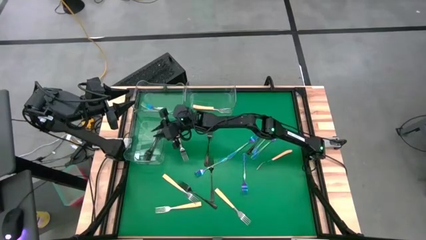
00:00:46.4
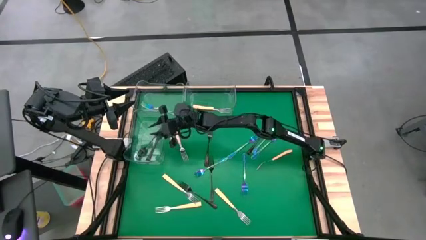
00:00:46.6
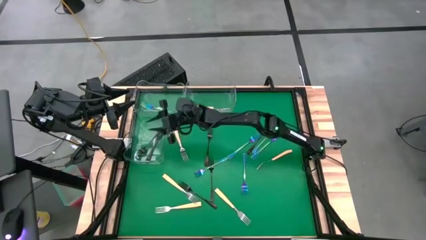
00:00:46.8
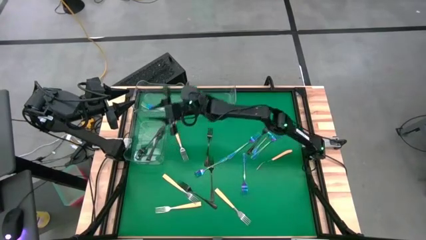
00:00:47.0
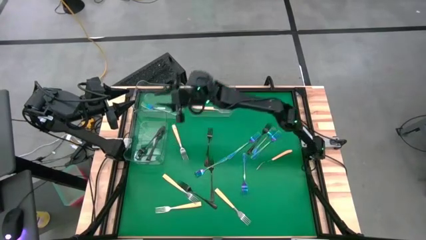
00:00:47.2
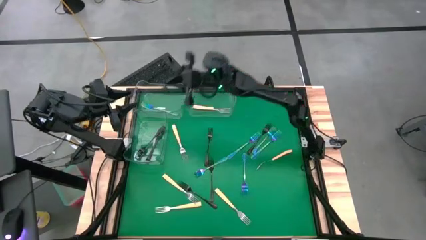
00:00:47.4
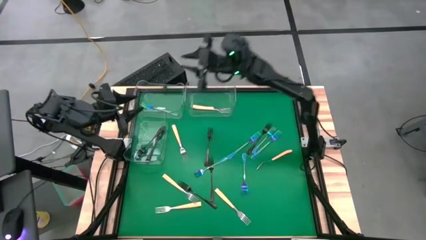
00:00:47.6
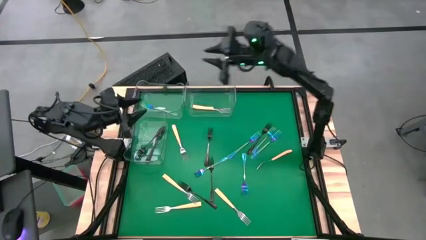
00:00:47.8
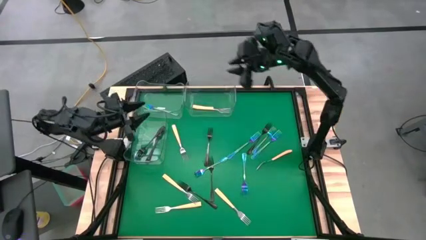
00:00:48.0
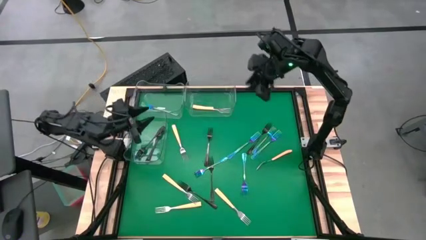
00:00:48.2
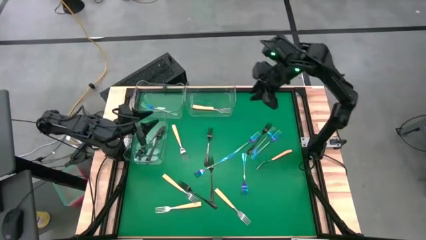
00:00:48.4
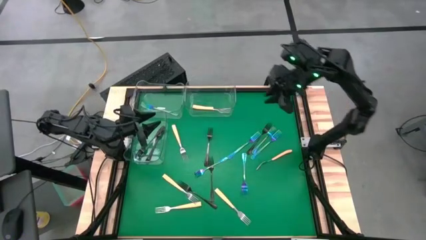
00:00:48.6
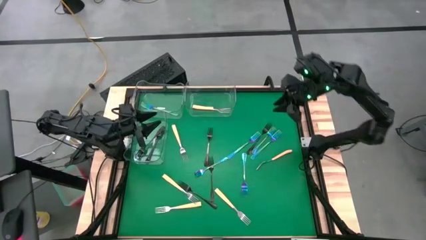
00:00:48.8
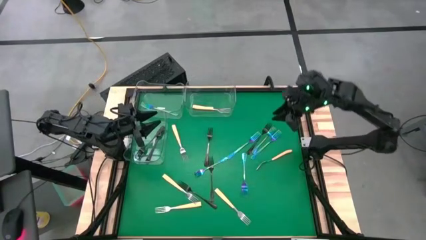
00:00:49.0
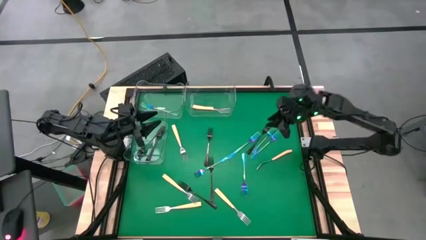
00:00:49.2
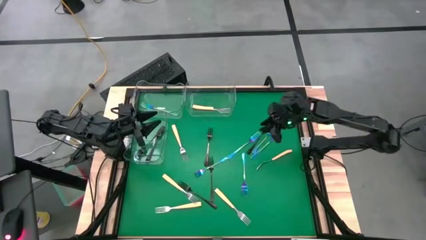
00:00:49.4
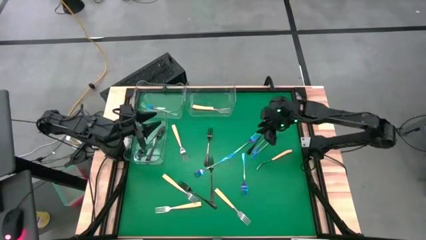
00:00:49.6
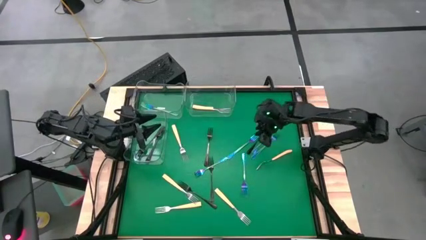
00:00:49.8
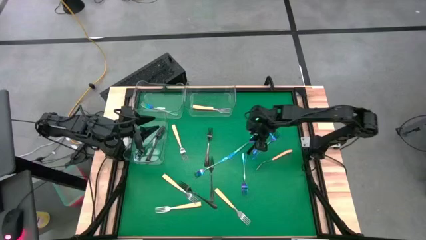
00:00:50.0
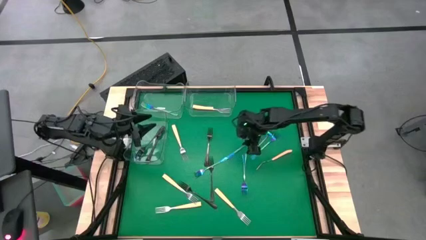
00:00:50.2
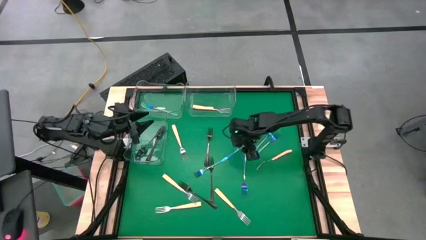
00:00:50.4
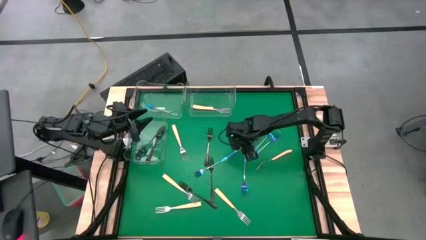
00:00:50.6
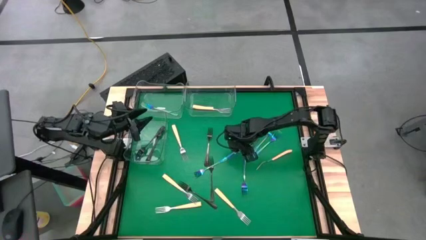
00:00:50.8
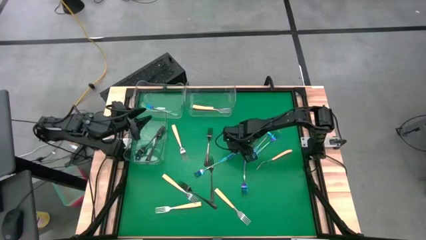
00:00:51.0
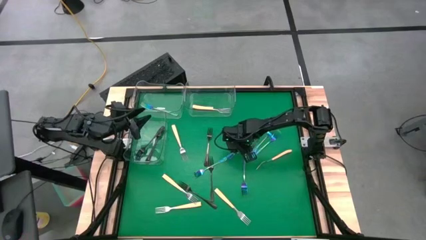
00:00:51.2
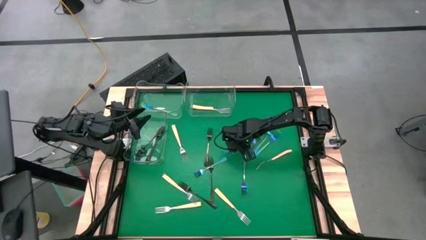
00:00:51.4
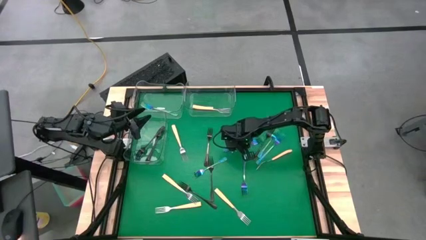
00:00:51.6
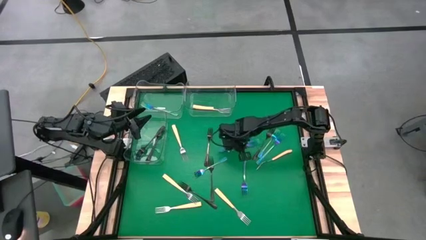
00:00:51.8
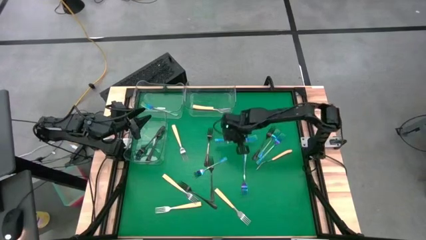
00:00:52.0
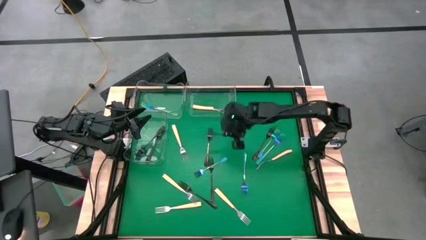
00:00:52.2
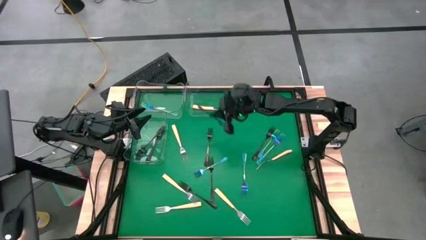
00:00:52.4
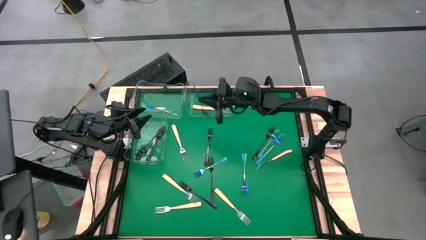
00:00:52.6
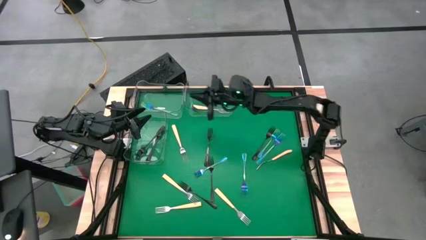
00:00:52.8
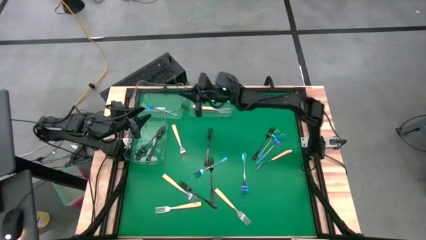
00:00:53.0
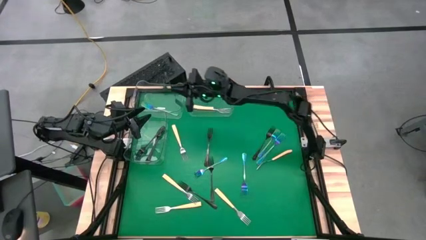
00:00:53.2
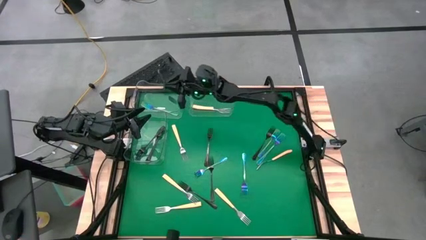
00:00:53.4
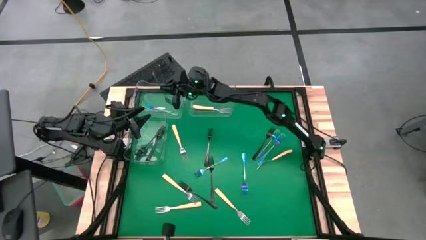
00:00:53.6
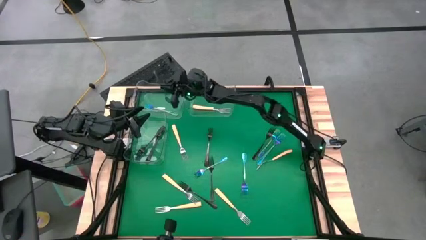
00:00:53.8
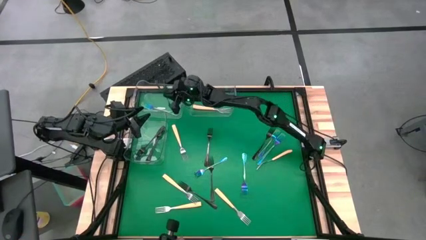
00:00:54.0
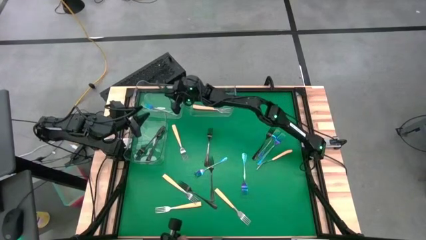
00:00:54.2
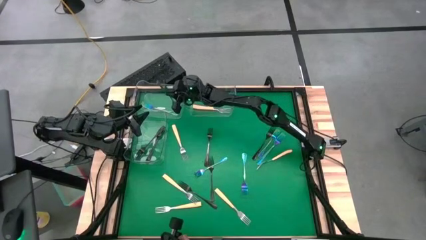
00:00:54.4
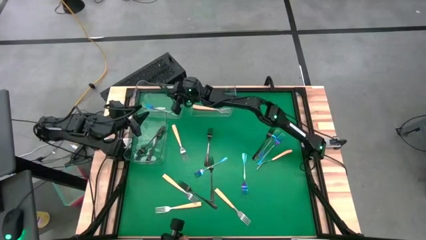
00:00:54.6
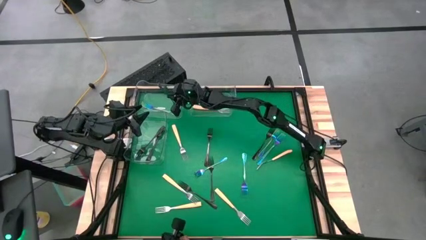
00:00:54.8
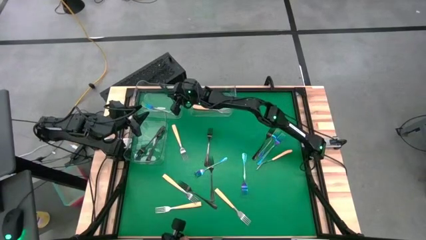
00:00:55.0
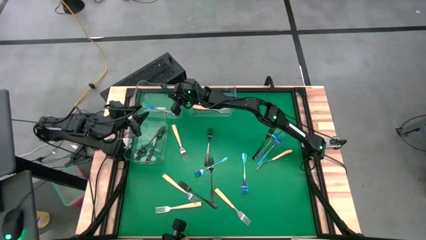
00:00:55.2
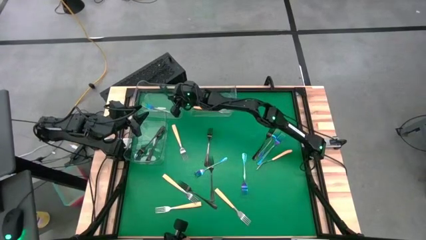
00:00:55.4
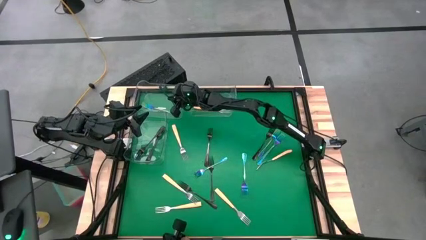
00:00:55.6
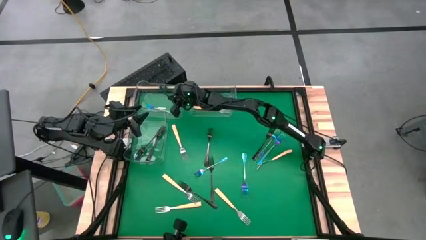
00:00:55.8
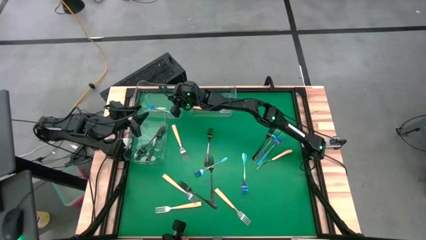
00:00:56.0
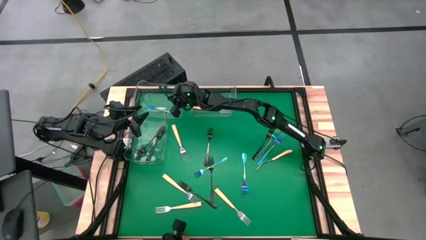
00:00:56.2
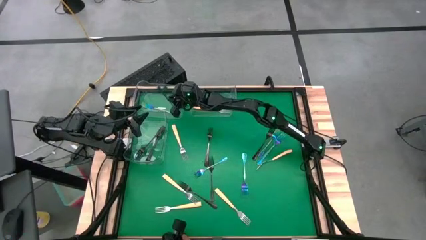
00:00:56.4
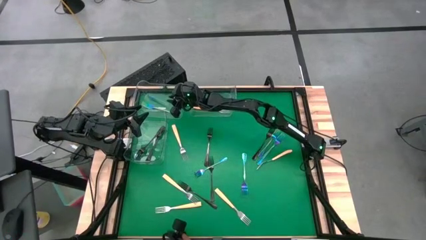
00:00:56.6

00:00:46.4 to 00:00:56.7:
Task: Sort silverware by color (type)
Put the iridescent fork into the top left transparent bin

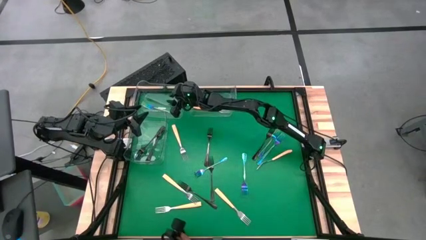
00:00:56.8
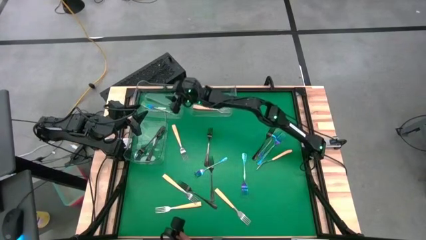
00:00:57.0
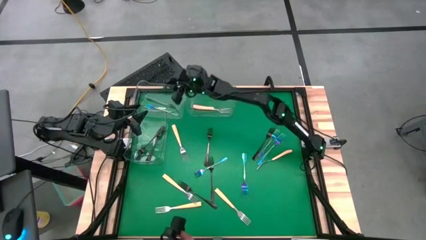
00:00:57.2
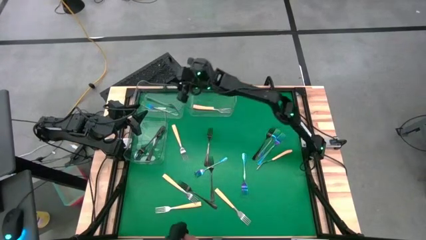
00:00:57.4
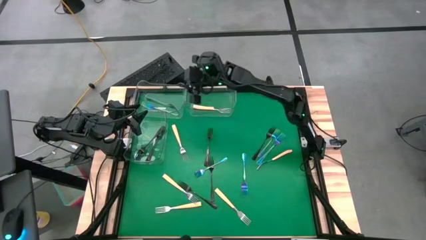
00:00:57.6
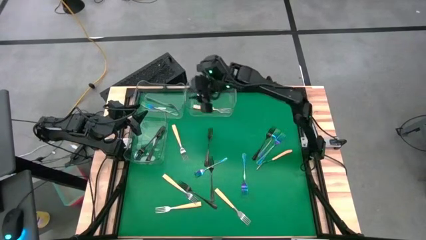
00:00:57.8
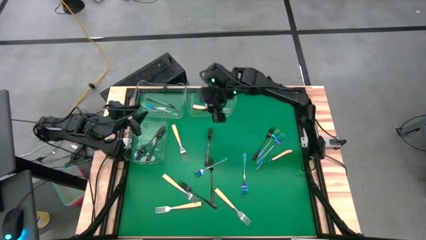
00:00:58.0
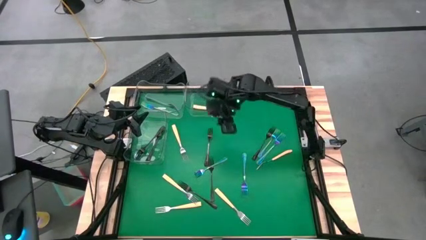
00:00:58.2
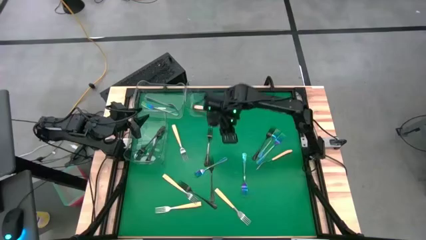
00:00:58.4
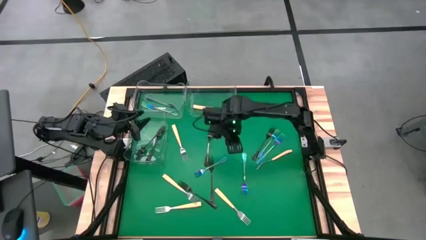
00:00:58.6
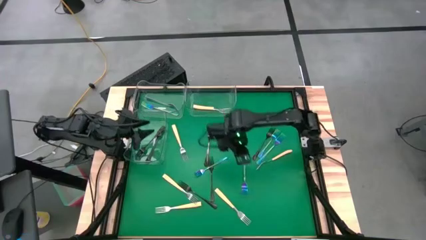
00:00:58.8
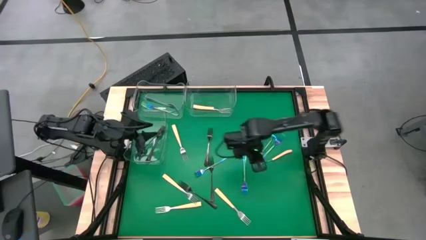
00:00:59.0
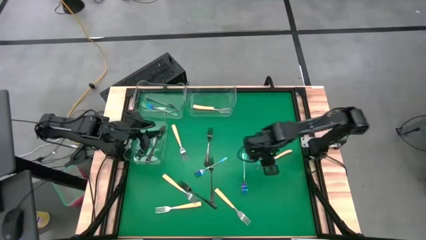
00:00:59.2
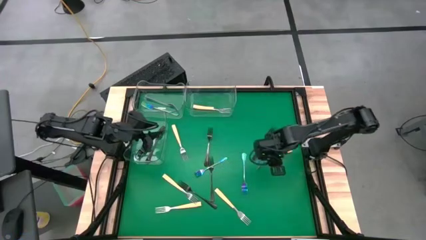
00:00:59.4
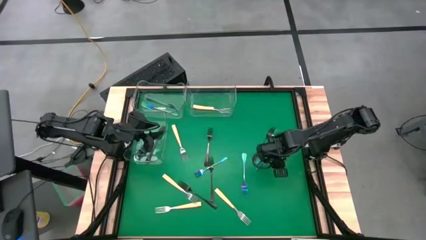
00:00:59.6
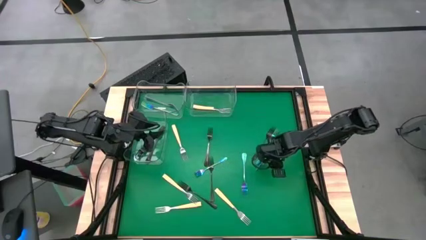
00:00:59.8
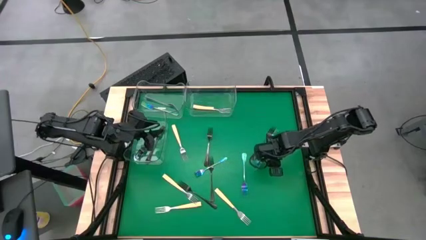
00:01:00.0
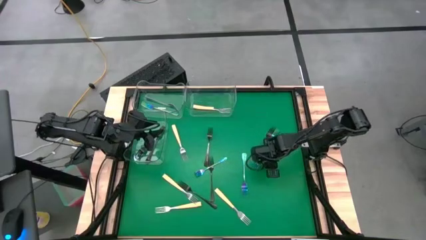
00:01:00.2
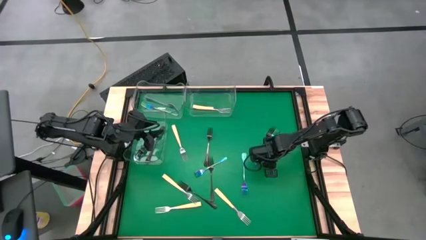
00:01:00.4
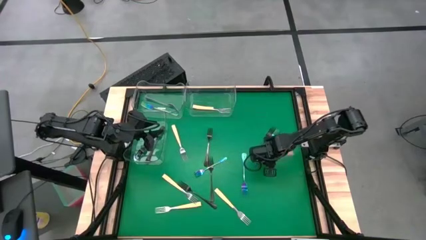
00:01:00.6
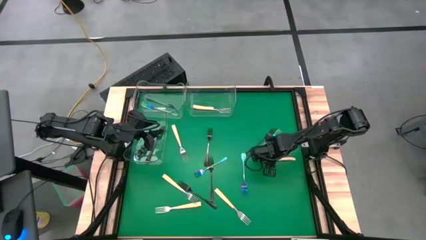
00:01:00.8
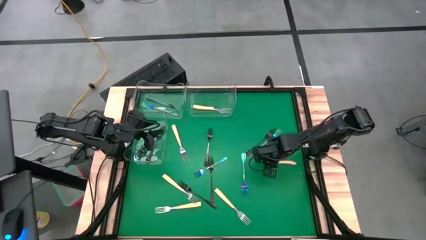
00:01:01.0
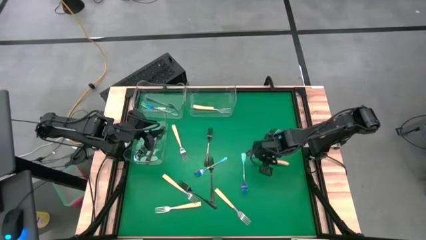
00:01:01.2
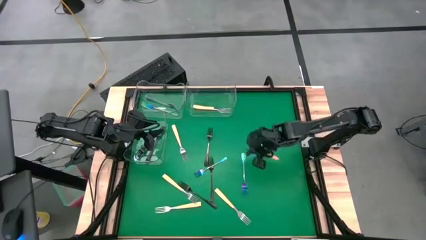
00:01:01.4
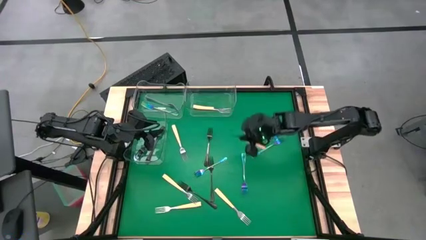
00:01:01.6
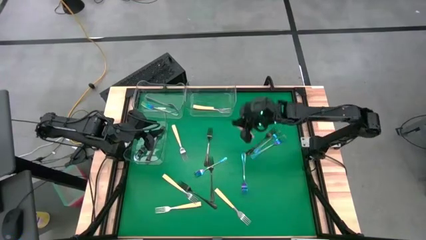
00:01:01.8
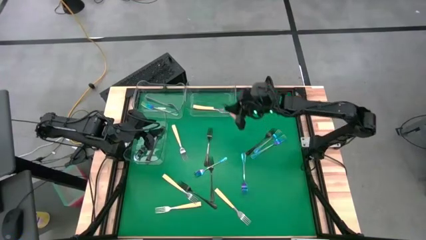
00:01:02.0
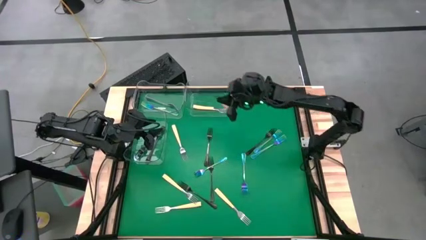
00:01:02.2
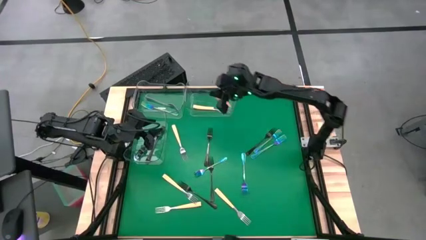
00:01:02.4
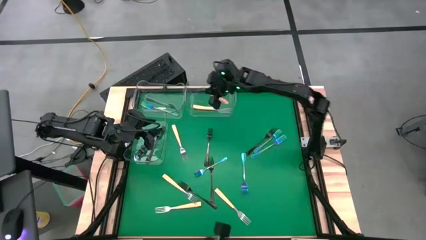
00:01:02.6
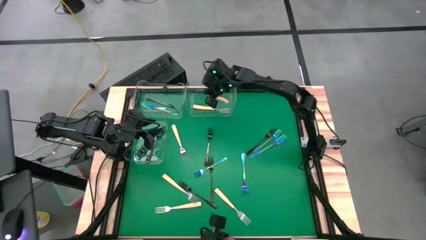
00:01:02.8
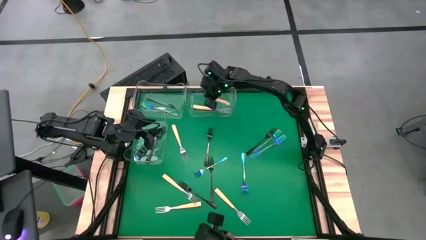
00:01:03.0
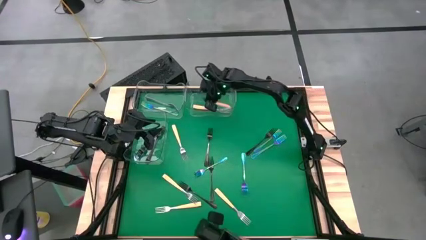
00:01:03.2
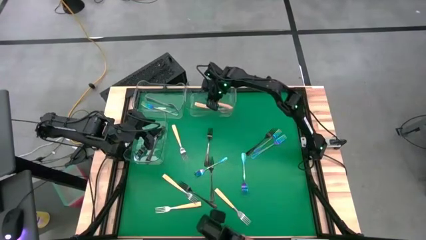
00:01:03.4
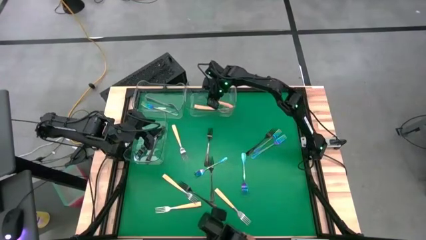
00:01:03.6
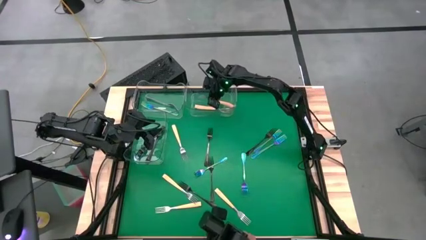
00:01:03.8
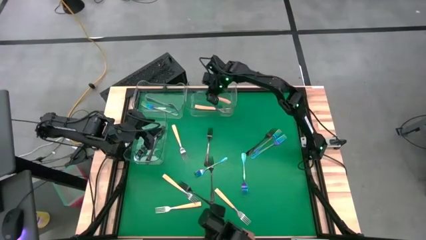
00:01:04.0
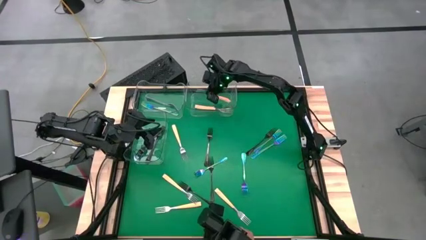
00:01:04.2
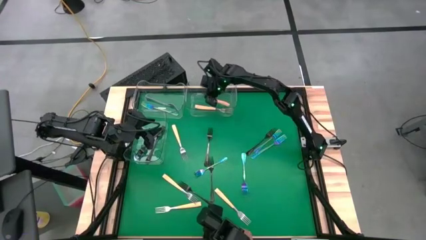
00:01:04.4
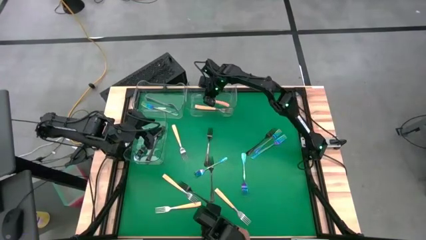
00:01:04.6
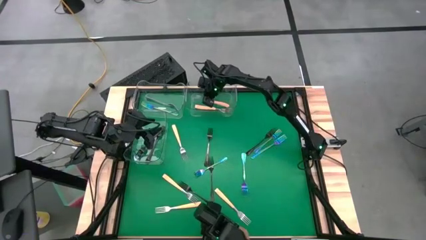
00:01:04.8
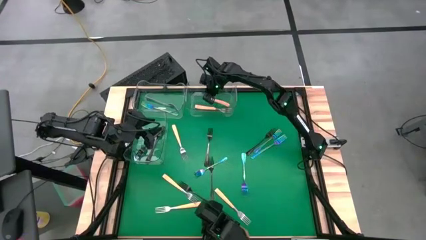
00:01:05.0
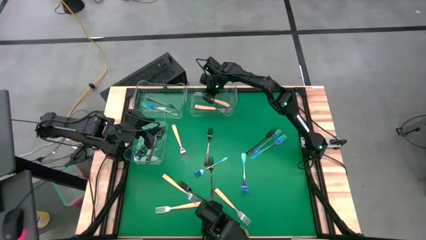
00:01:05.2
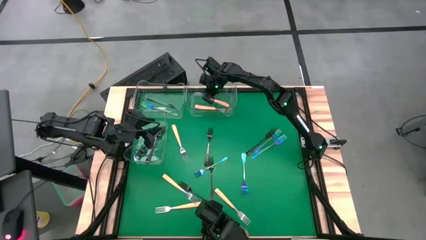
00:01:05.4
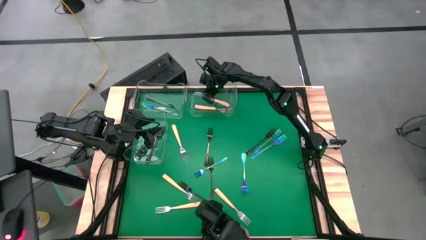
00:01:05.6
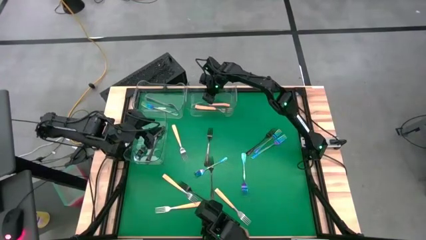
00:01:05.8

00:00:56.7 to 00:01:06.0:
Put the yellow fork into the top right transparent bin
